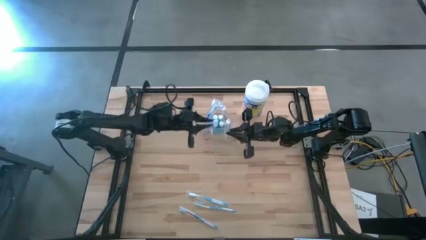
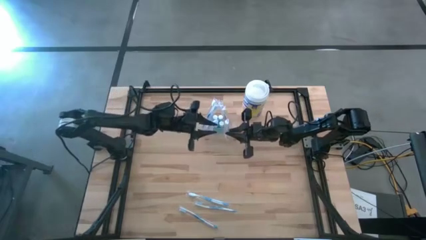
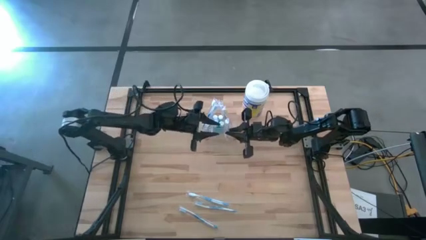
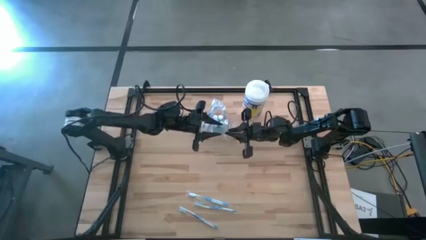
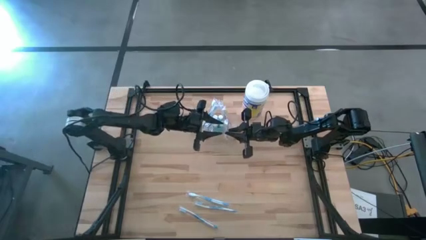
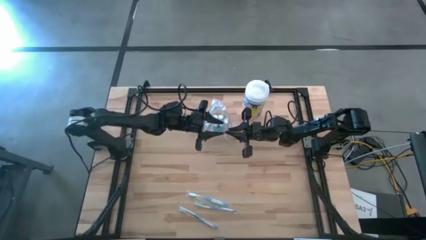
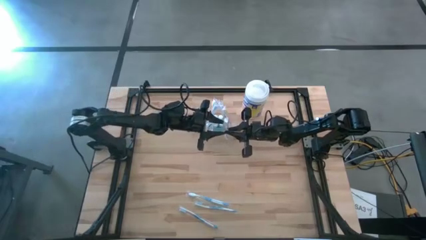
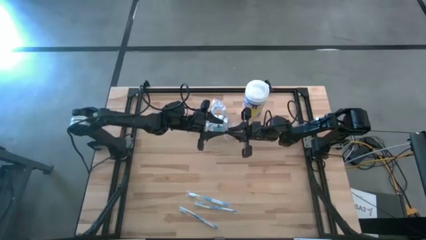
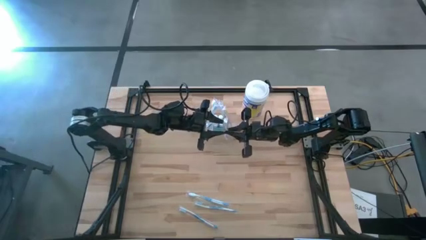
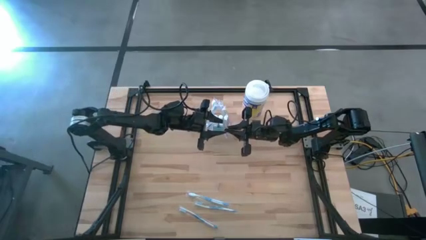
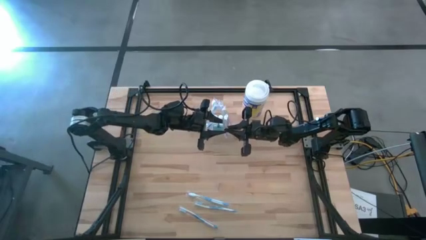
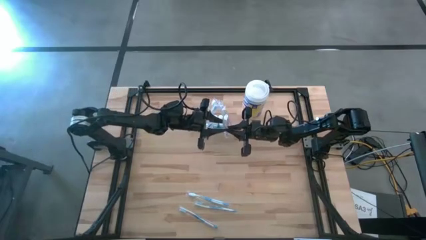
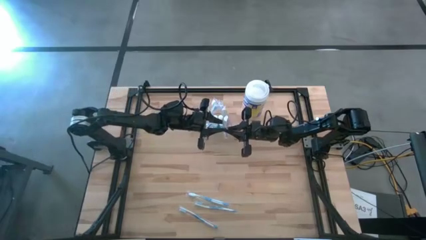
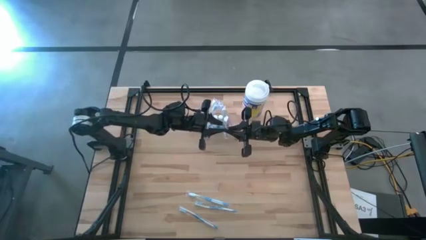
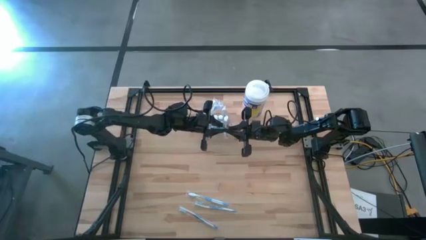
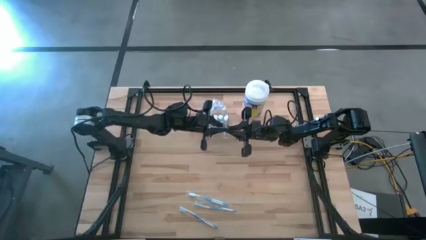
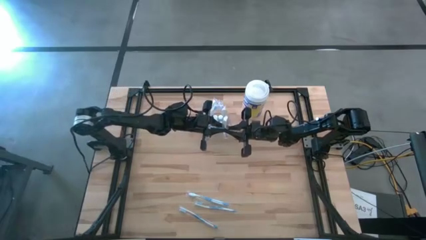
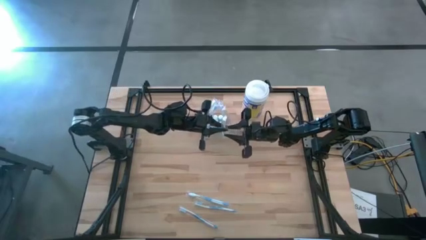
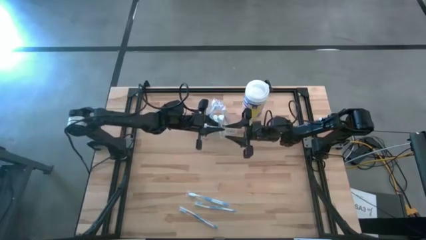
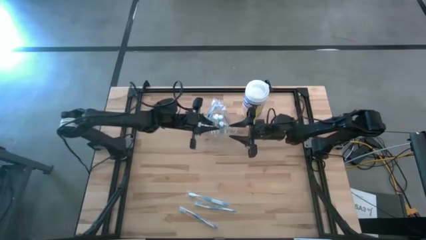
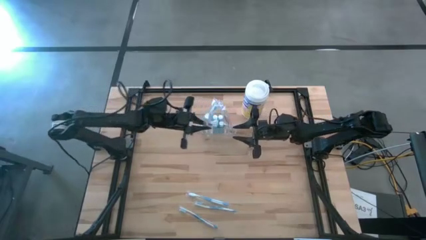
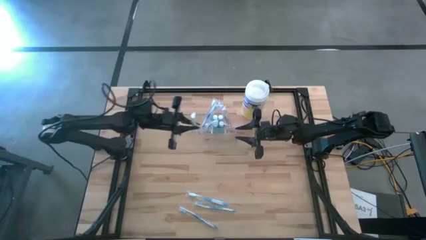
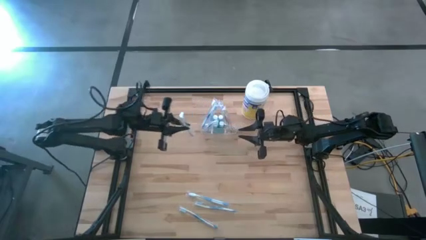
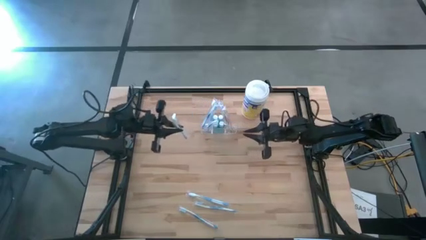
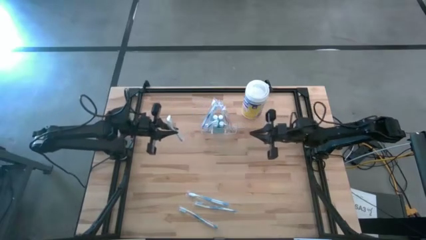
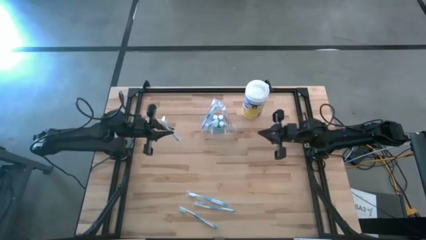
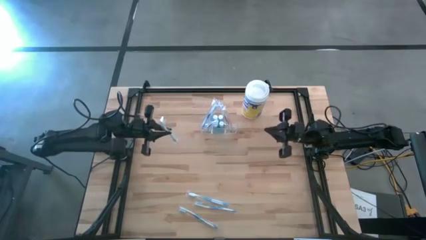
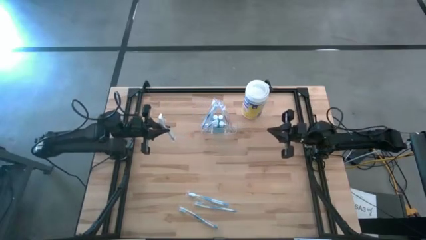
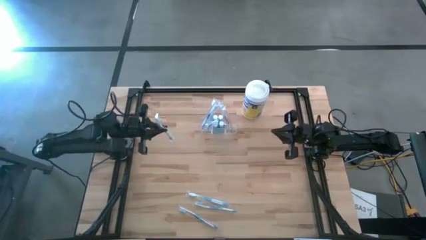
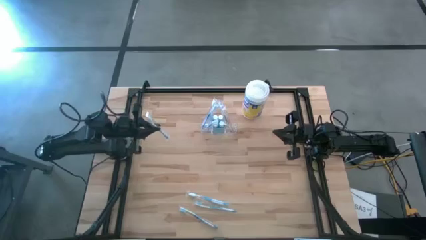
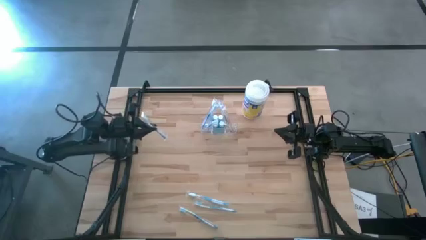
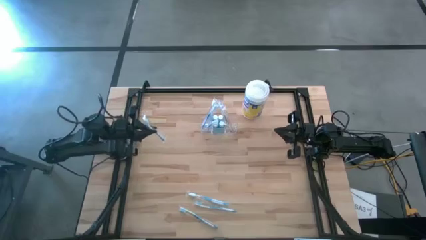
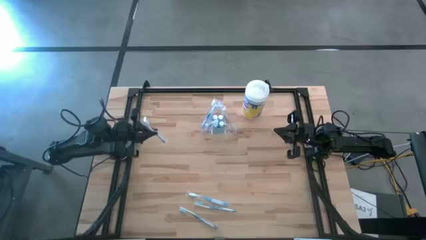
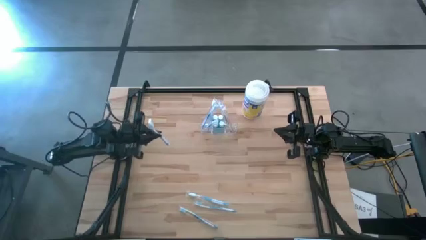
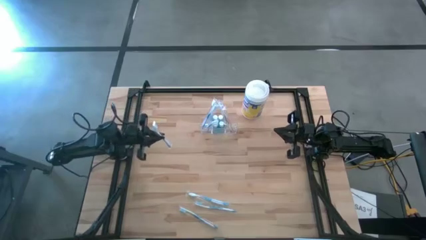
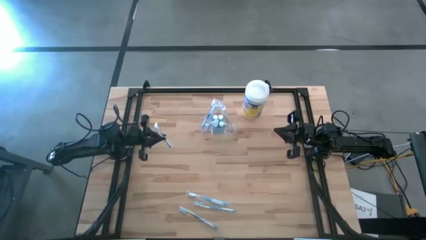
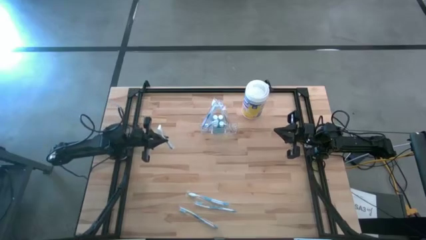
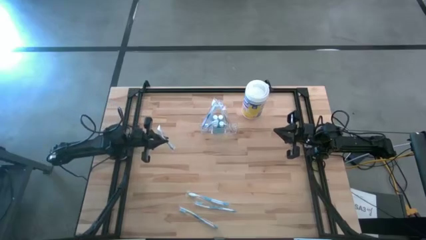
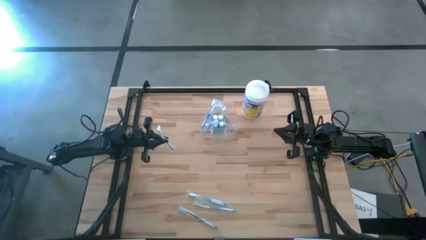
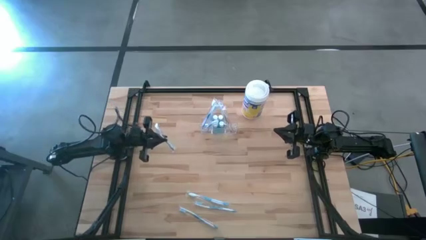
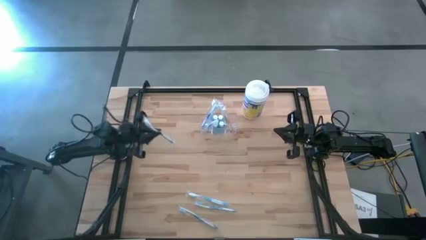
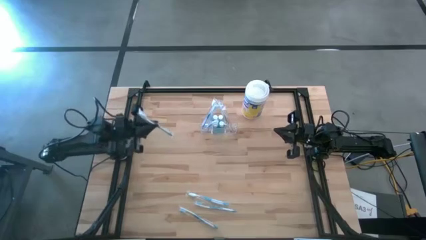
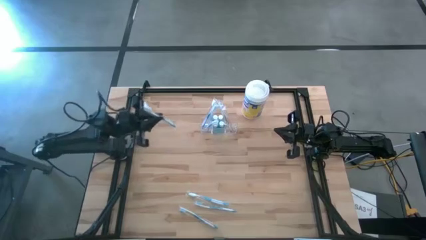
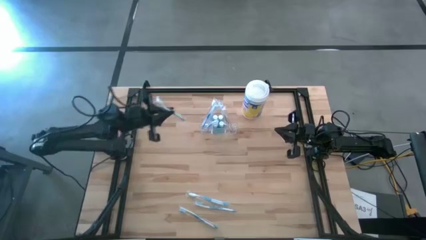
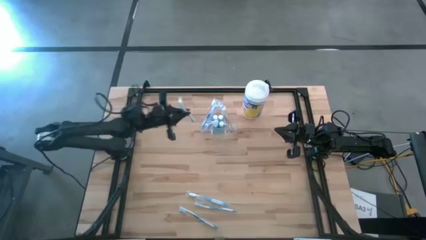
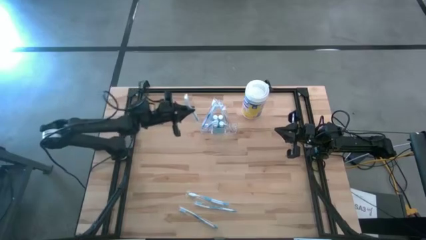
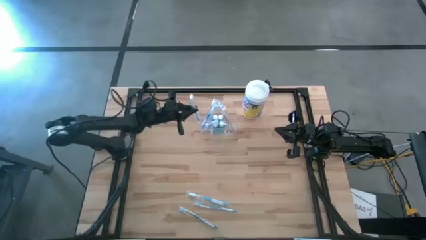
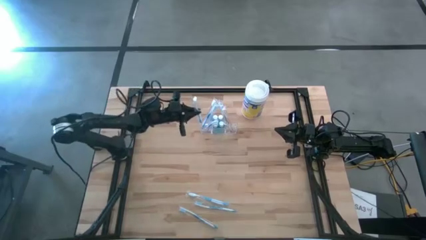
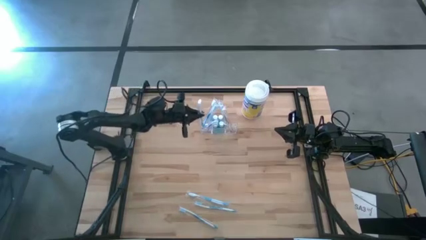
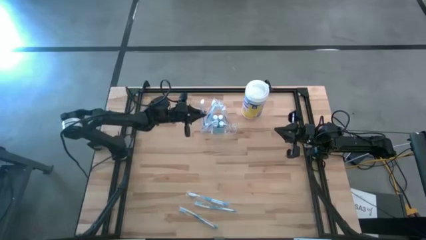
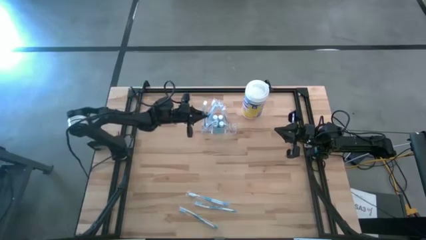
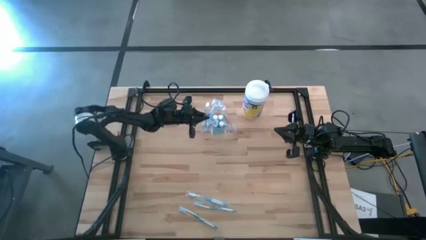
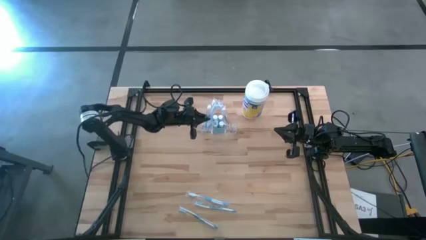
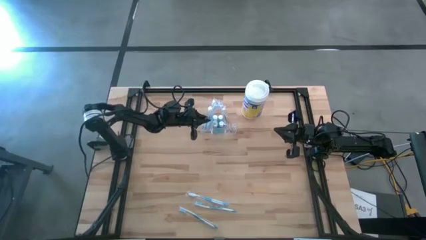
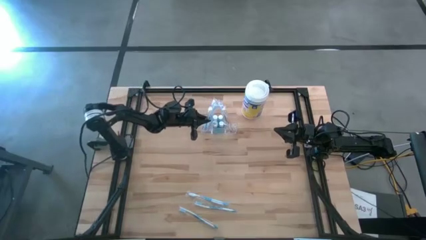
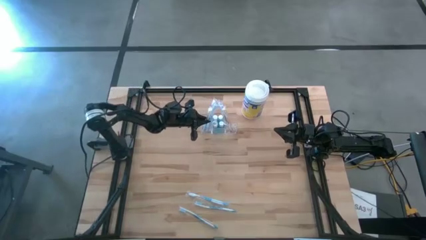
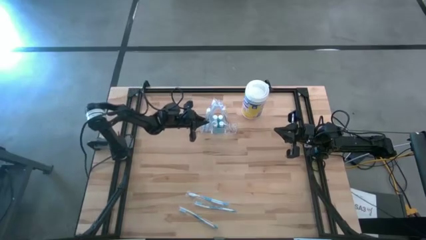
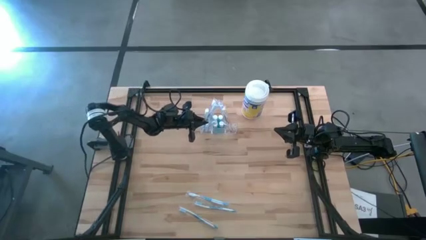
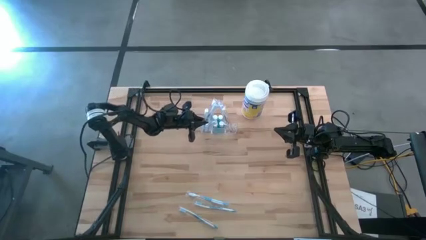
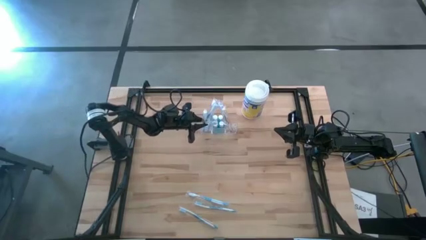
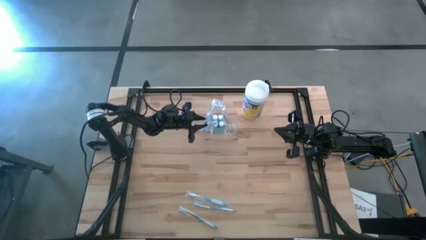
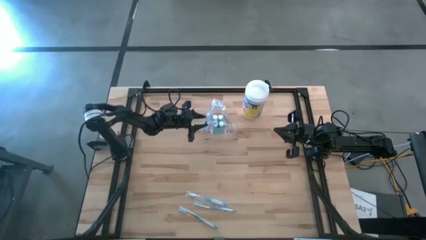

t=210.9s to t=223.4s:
Task: Pick & Place toothbrushing station
Put the blue toothbrush into the transparent organizer
